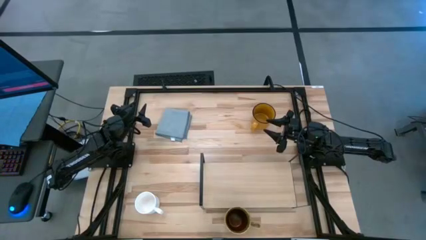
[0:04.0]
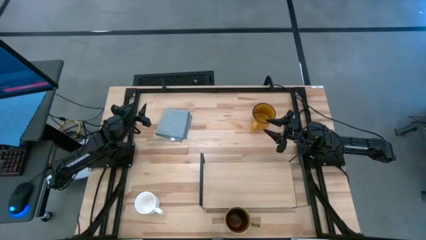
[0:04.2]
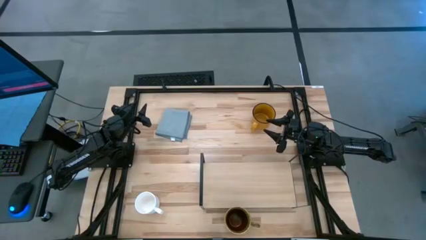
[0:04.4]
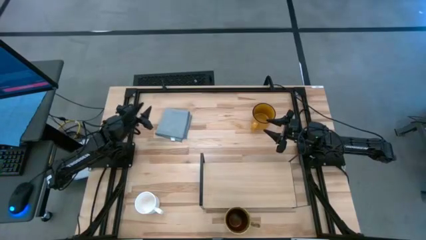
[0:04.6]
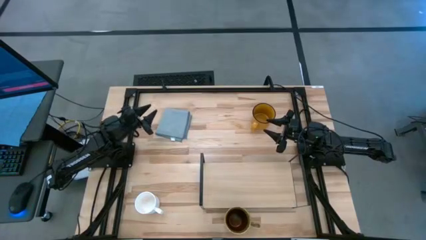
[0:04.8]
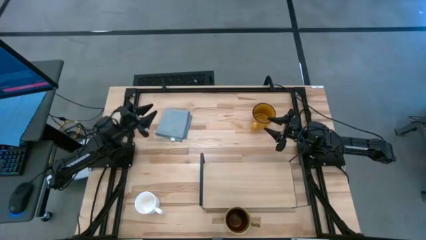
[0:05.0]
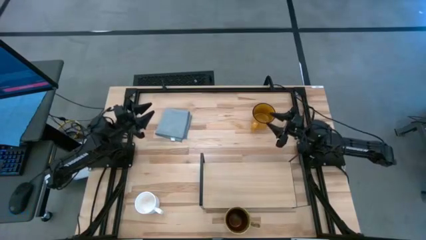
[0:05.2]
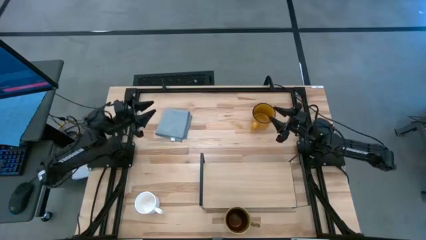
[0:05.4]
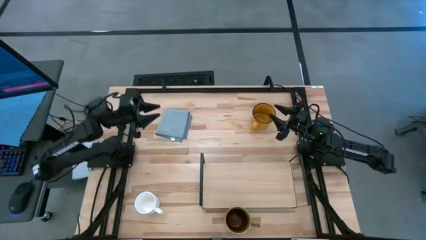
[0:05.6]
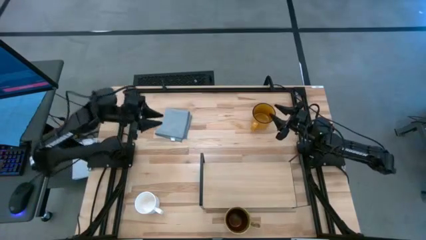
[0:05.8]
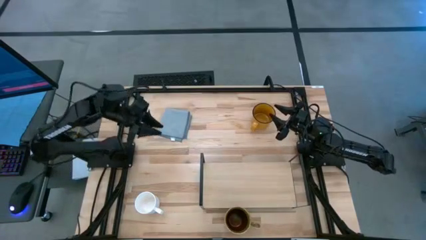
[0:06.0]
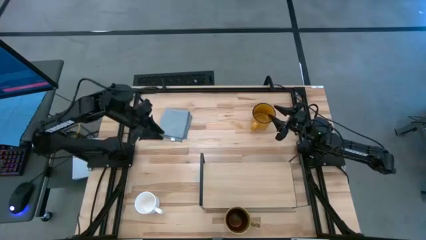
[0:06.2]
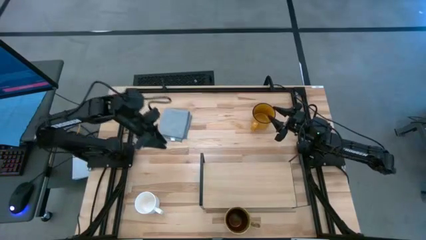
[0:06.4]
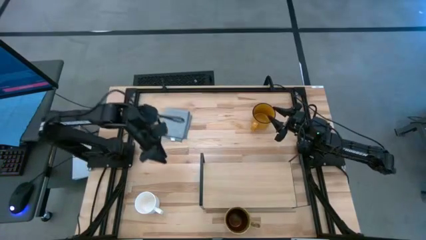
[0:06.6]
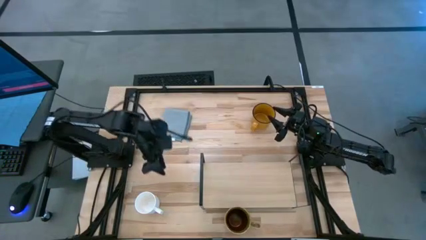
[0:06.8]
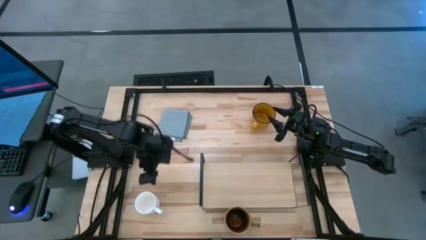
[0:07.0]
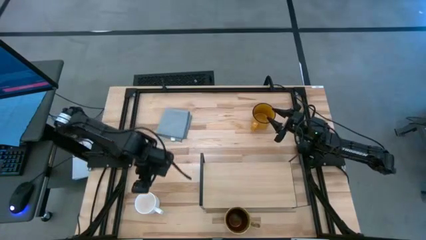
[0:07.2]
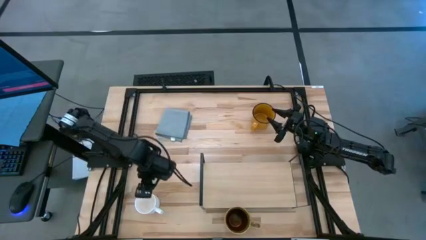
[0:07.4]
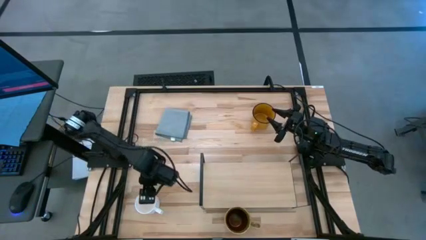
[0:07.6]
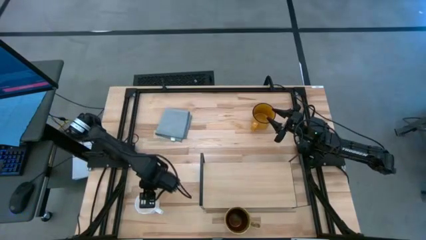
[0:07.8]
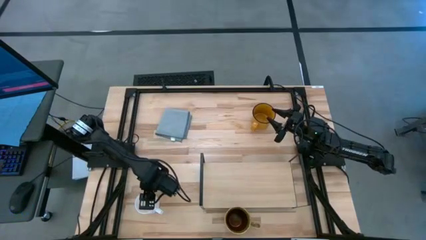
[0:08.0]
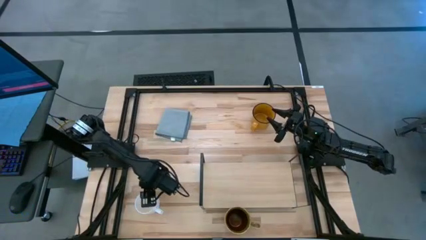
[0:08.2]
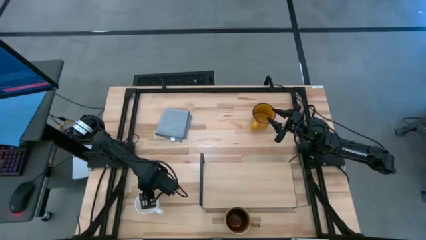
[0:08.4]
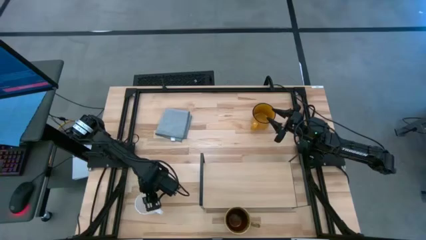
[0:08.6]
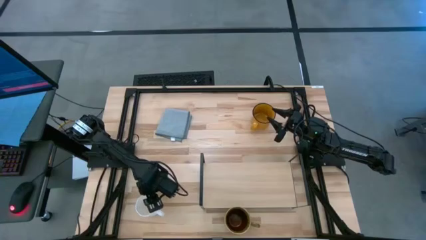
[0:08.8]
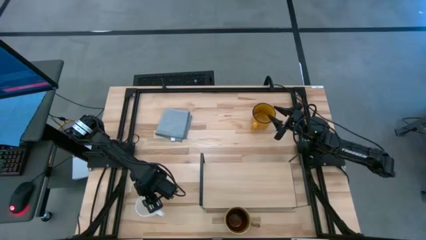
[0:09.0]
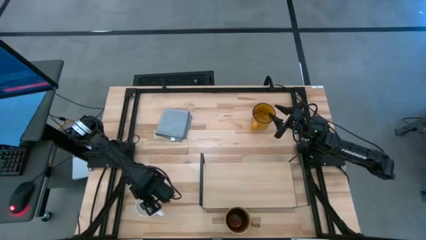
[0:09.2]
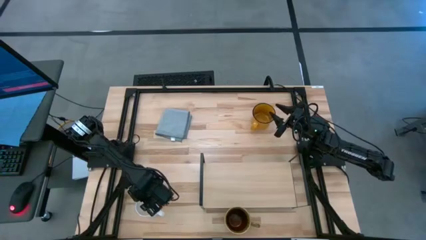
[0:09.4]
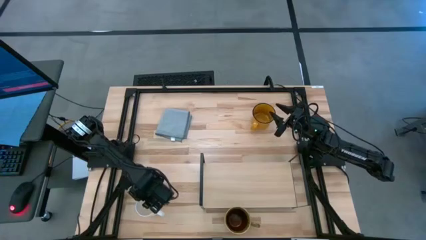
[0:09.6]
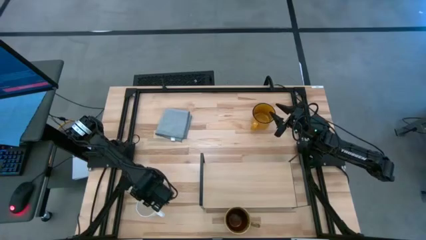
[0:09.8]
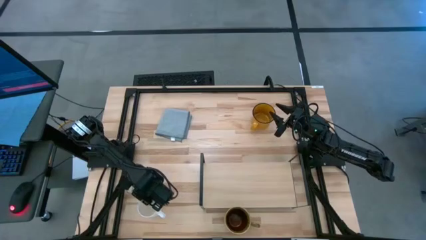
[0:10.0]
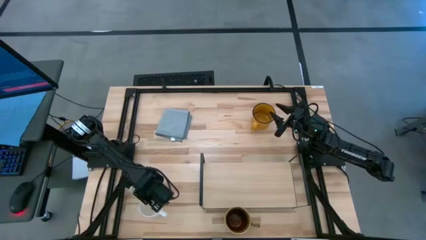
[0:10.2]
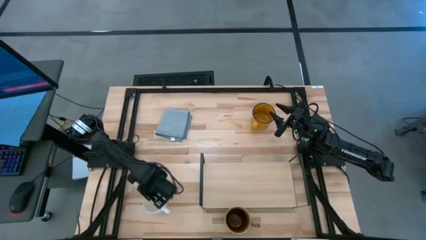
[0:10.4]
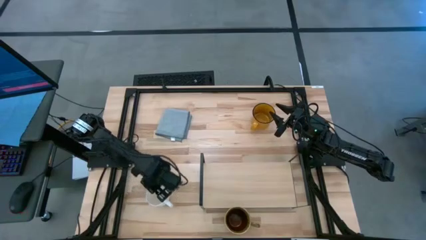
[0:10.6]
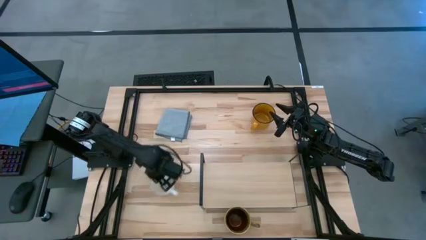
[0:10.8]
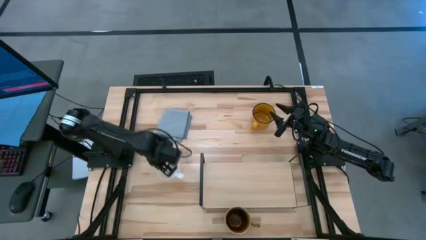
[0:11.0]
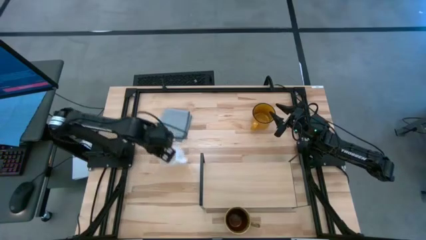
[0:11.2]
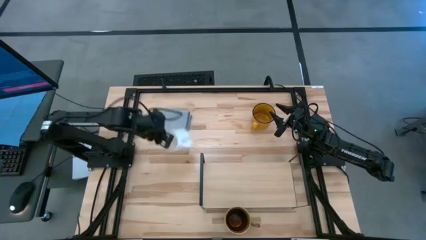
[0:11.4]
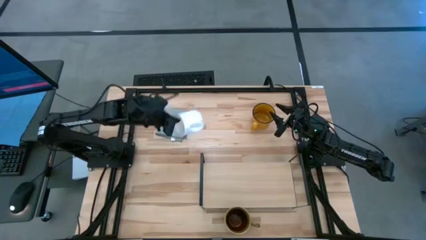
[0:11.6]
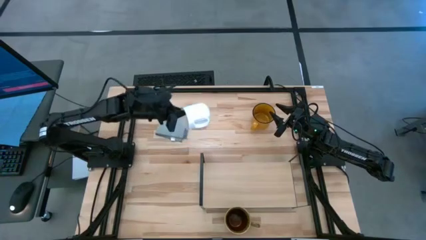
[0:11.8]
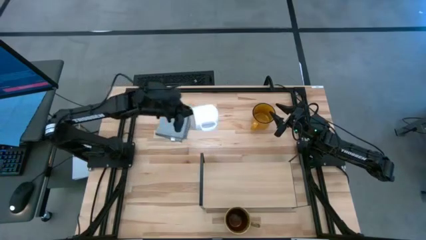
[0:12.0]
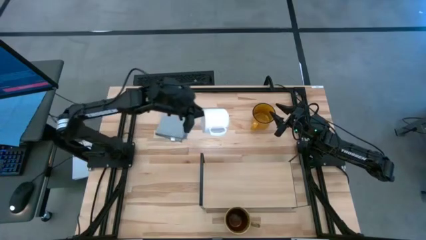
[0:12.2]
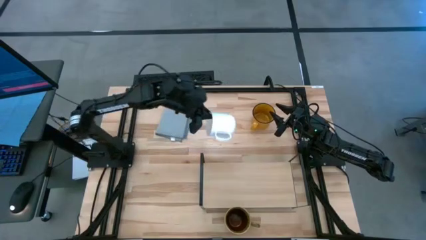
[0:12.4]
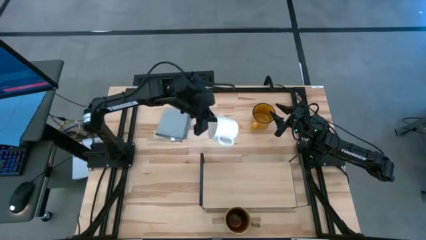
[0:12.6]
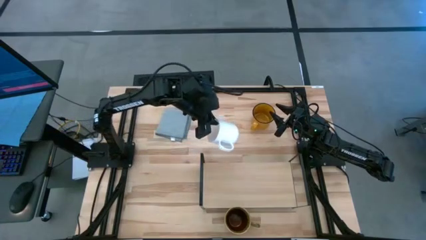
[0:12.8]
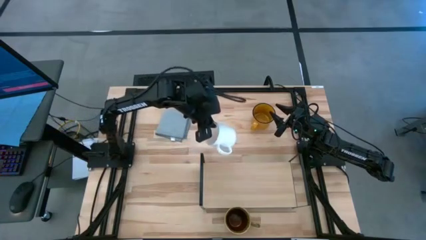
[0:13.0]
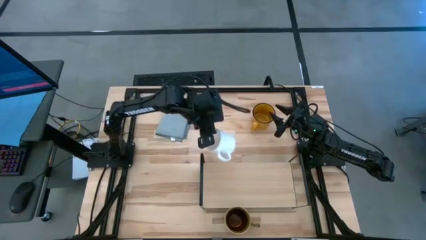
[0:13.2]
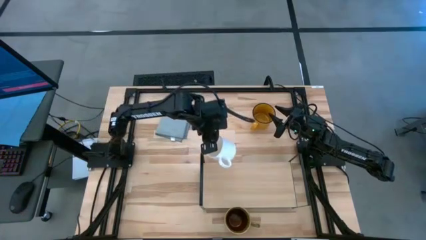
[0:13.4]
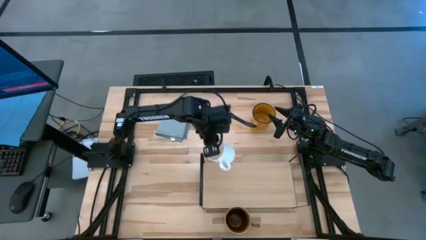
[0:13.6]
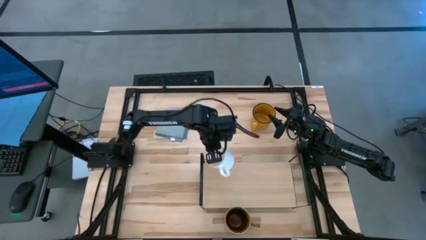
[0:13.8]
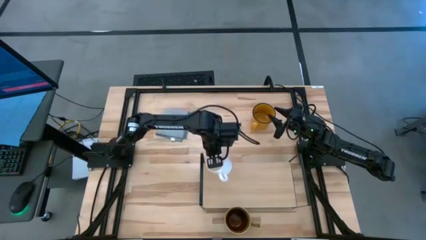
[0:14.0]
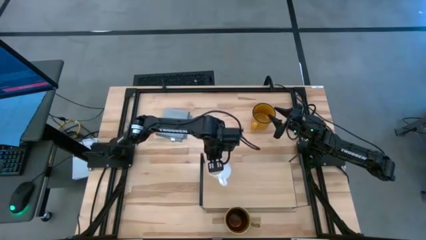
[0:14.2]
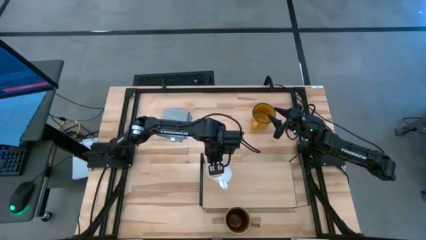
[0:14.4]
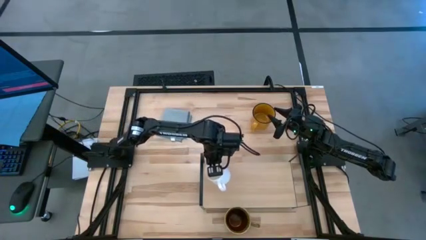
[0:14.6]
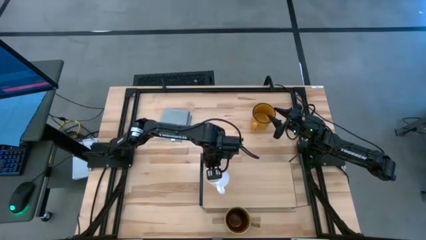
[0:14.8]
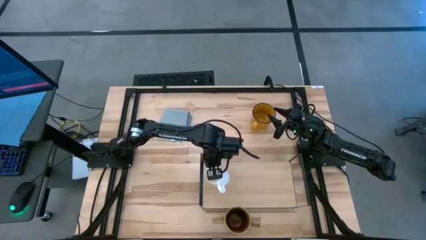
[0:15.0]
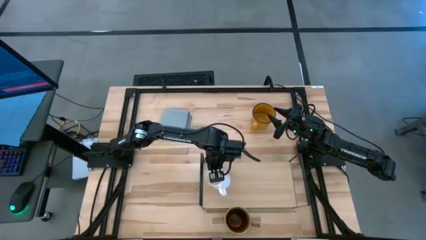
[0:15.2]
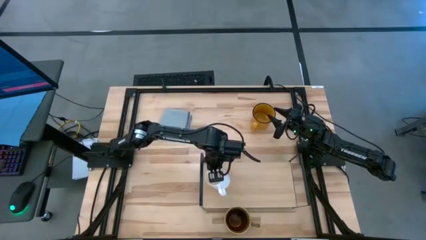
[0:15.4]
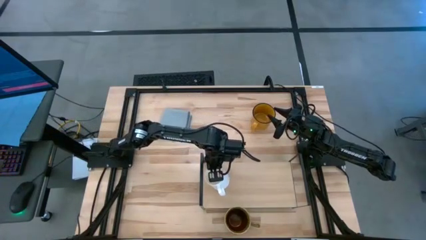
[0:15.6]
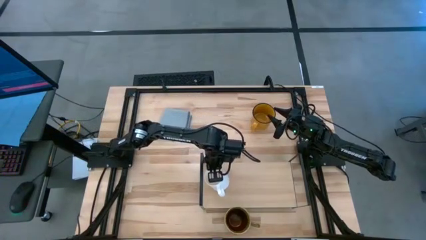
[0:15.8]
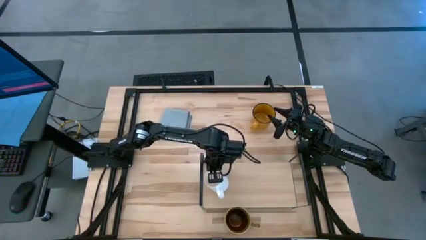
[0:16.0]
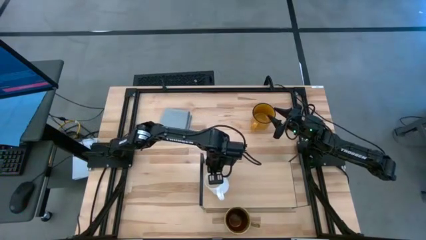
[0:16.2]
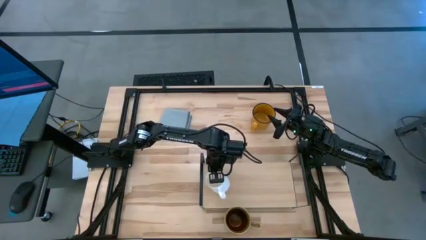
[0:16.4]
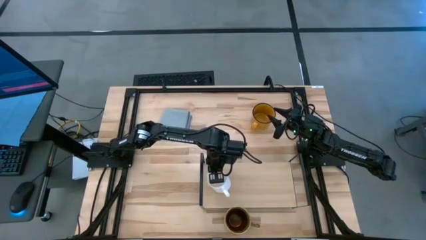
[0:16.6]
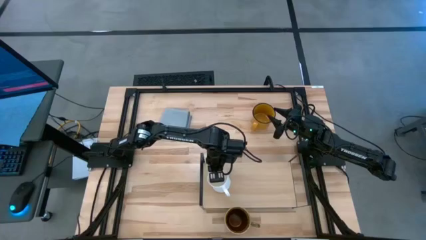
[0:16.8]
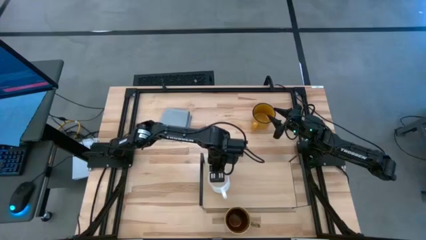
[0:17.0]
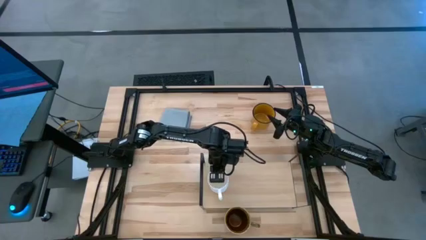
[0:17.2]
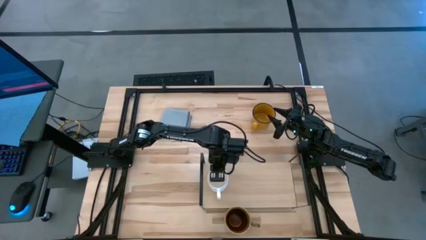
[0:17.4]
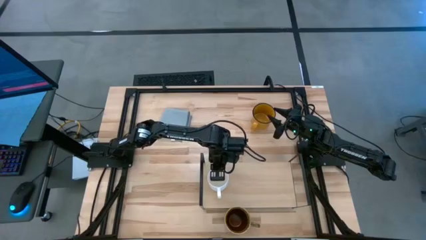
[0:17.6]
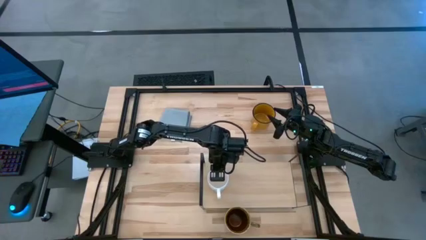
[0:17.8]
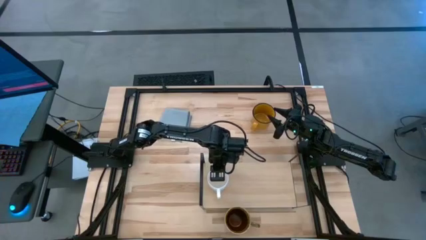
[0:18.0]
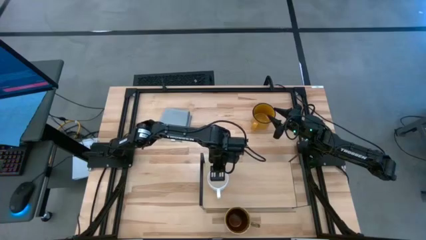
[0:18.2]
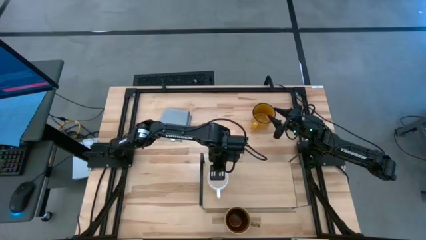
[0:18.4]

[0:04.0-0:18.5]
Task: Stack small to large cups/mugs on shelf
Put the white mug on the shelf
